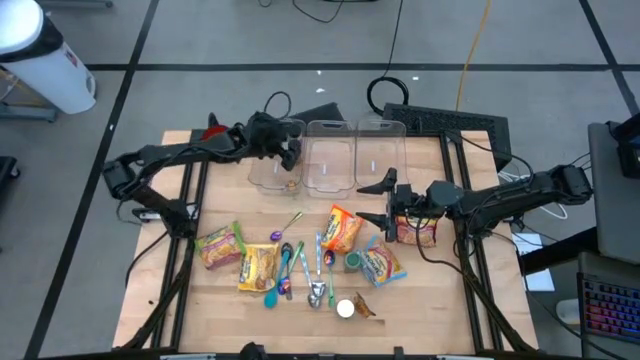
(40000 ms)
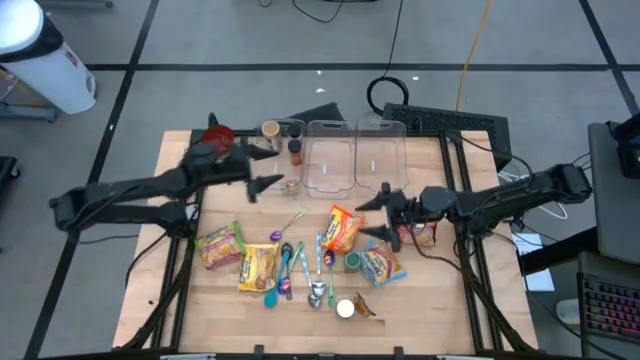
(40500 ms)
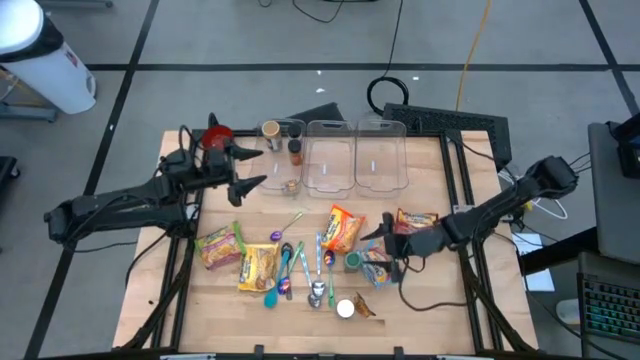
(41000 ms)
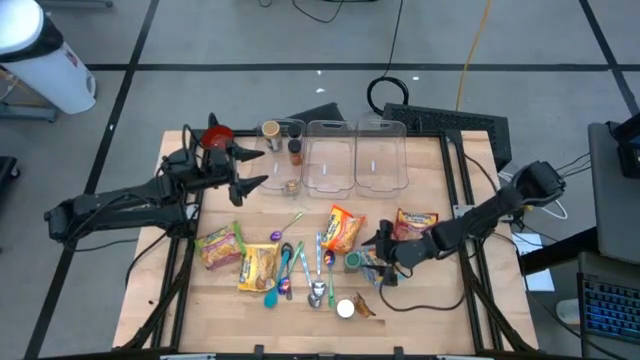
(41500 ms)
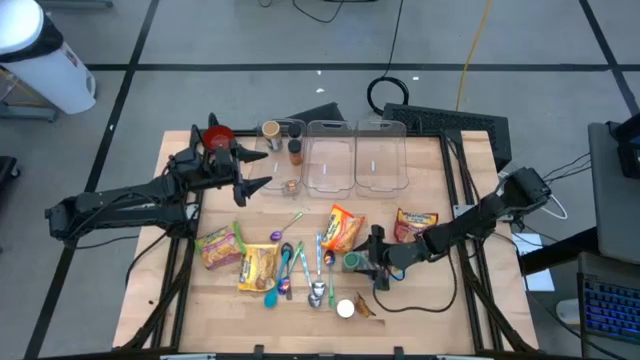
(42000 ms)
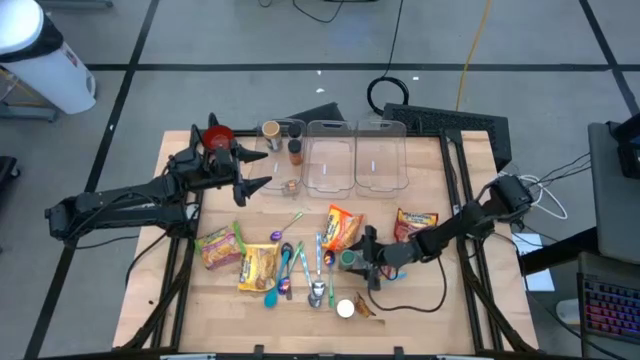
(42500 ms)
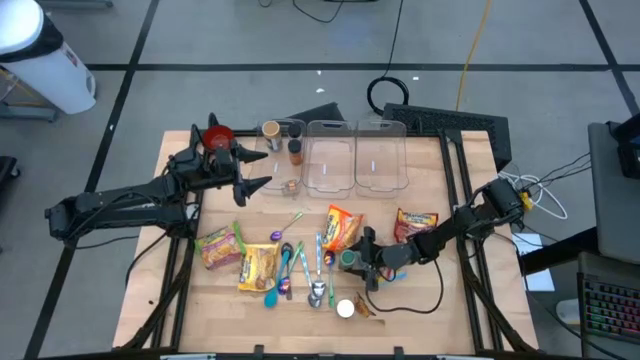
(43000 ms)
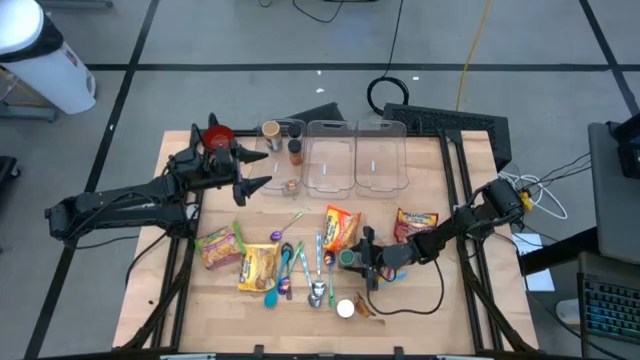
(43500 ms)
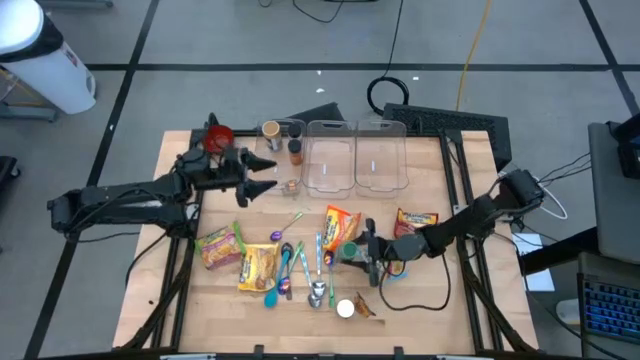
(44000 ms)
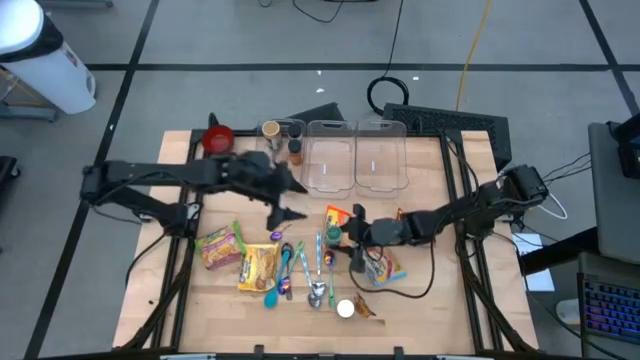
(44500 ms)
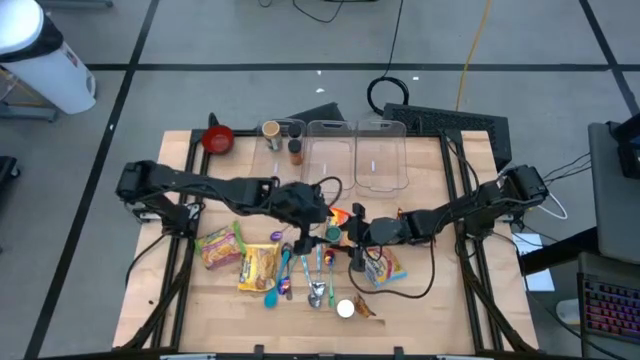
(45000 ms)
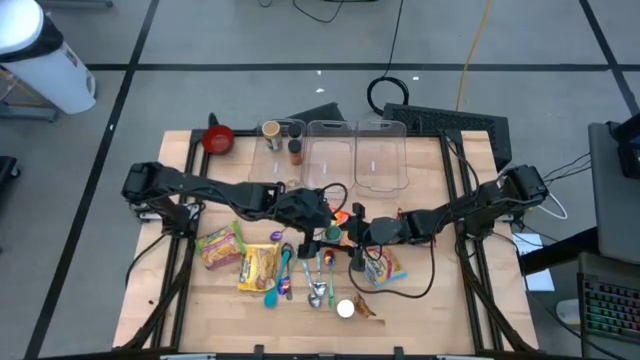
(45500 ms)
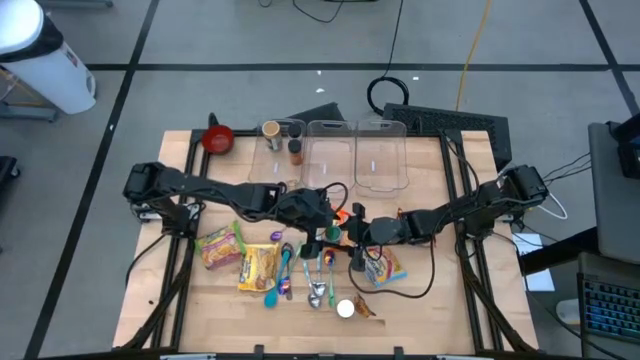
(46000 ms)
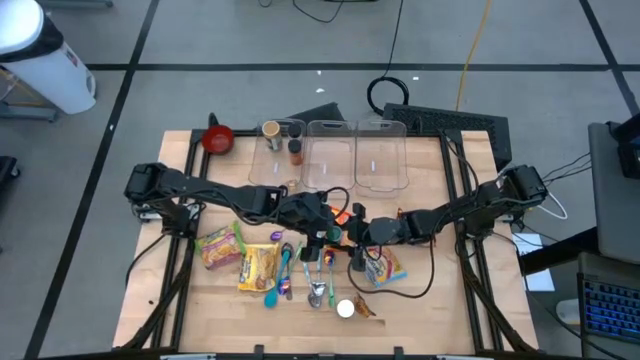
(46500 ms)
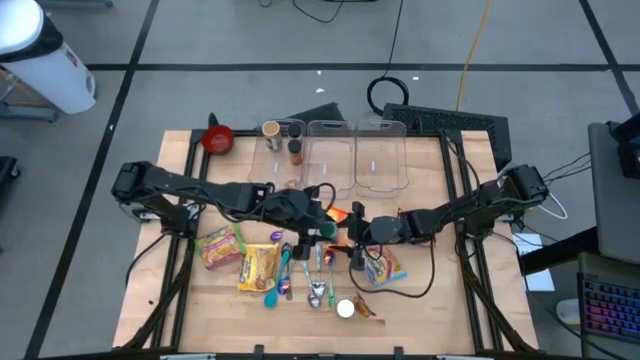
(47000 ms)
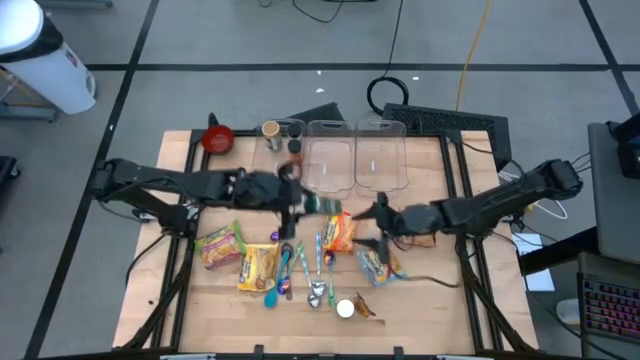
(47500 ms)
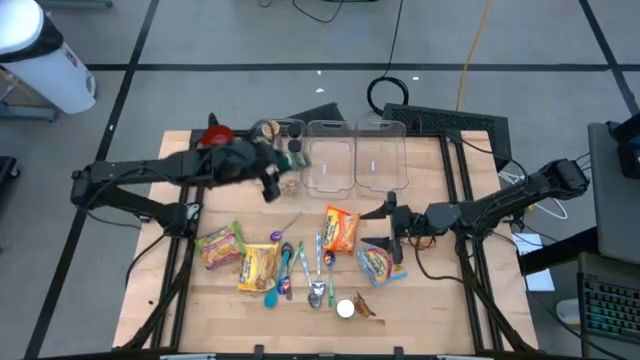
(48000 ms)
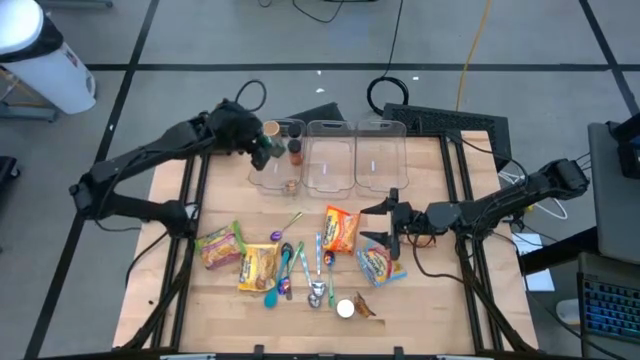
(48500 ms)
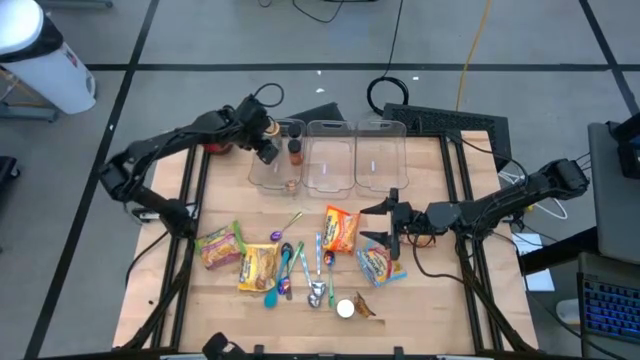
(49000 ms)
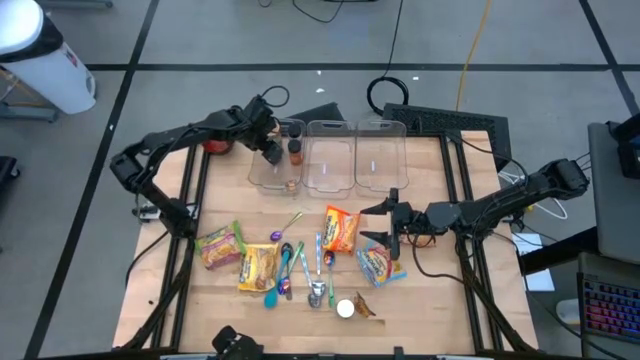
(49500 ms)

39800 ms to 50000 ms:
Task: Pick & Place Food Item
Put the green seasoning bottle into the left transparent bin

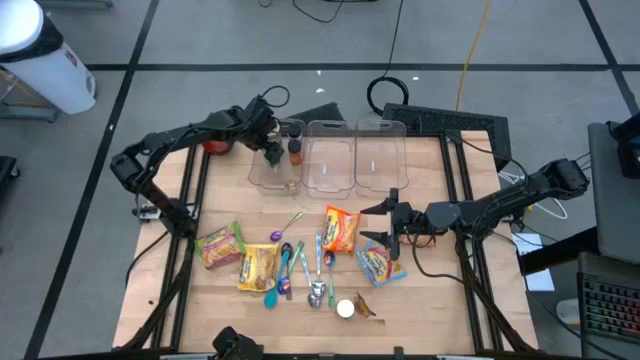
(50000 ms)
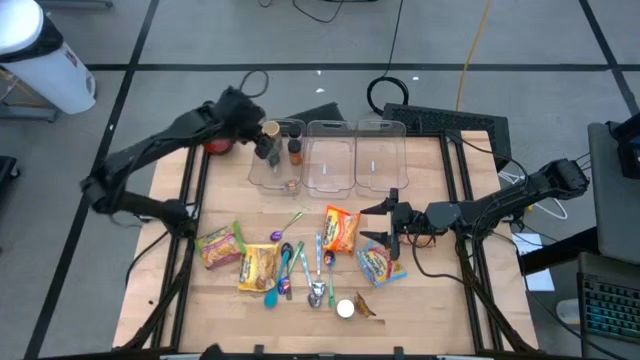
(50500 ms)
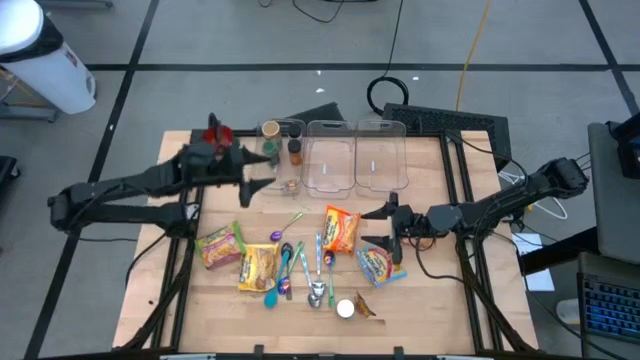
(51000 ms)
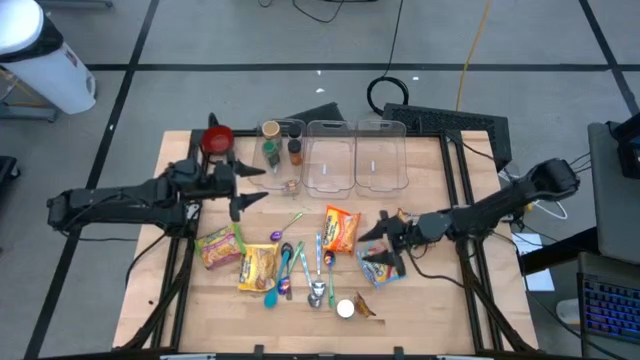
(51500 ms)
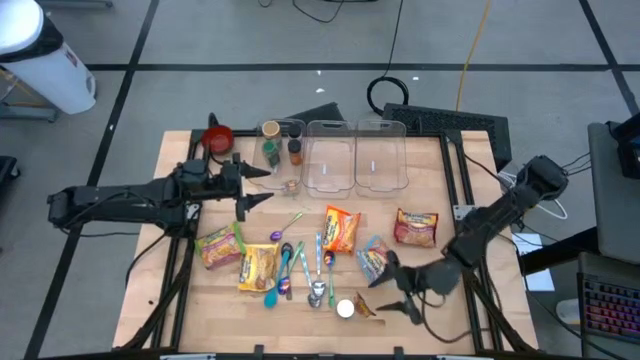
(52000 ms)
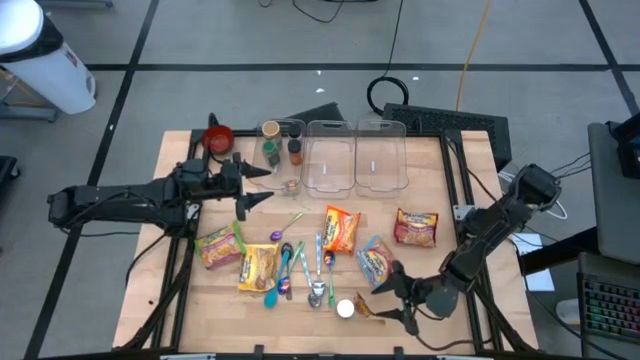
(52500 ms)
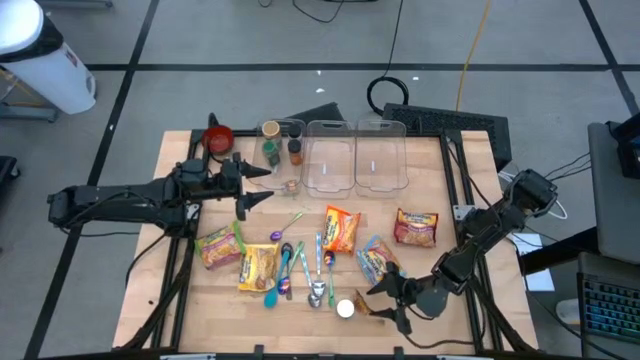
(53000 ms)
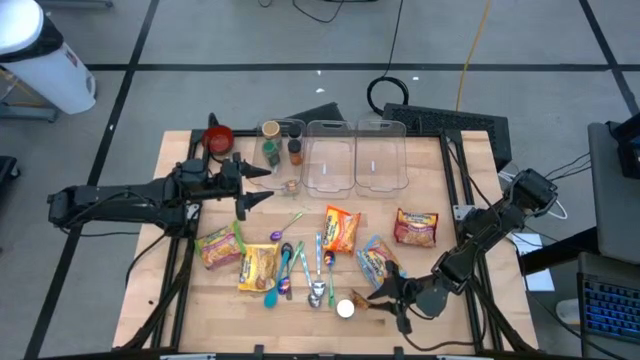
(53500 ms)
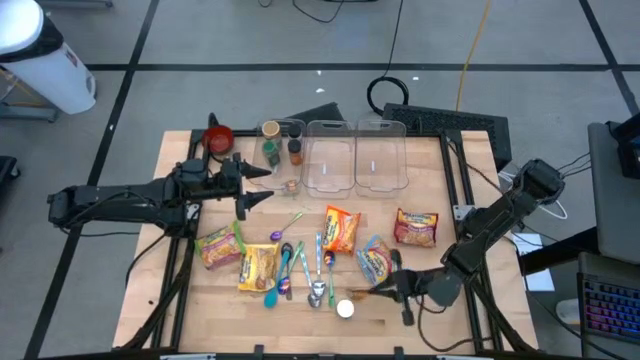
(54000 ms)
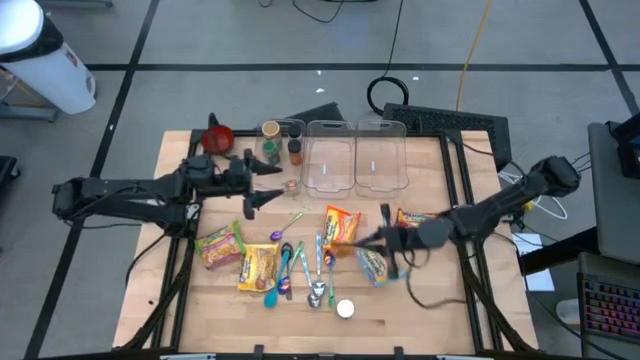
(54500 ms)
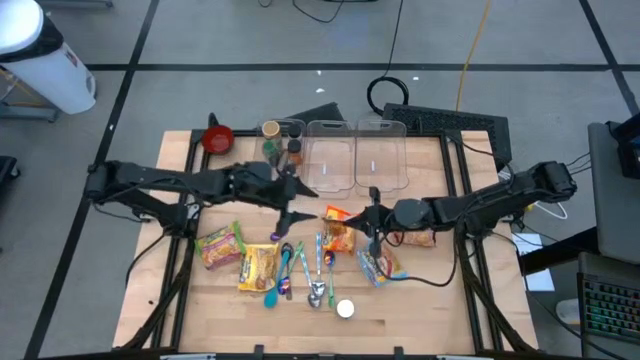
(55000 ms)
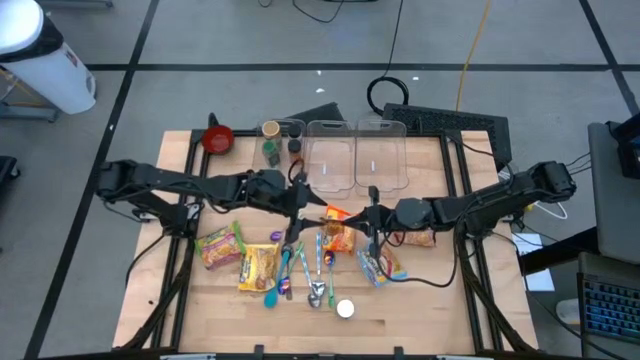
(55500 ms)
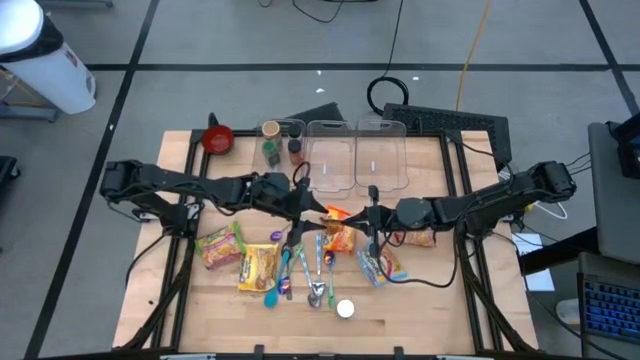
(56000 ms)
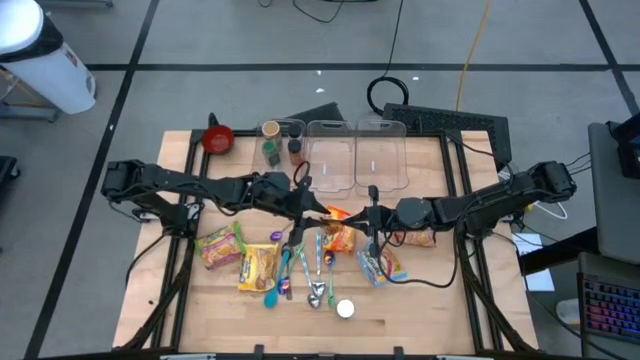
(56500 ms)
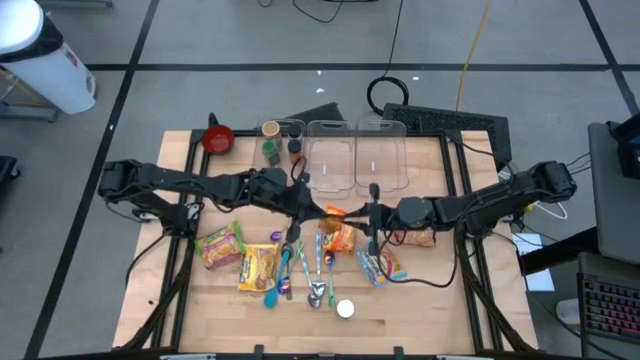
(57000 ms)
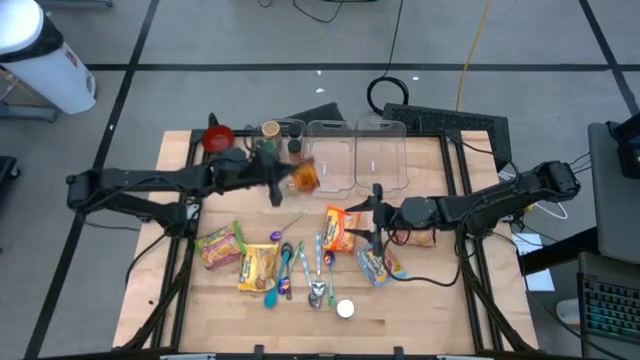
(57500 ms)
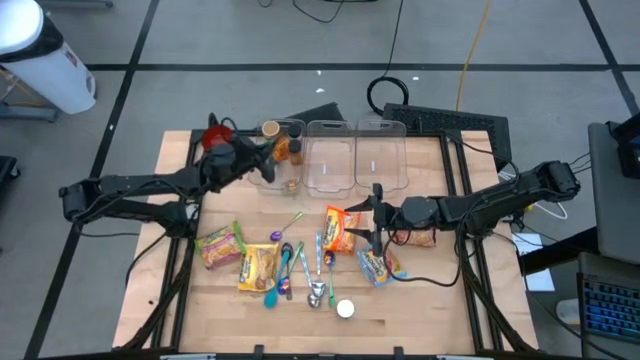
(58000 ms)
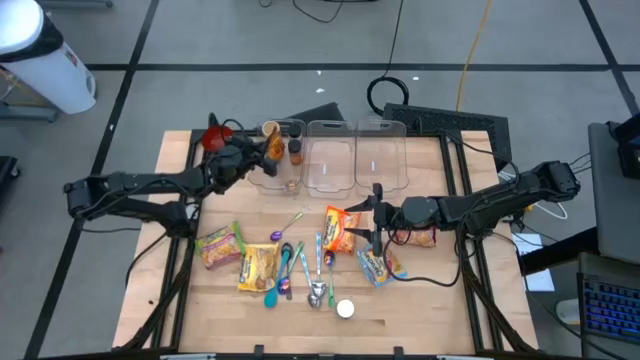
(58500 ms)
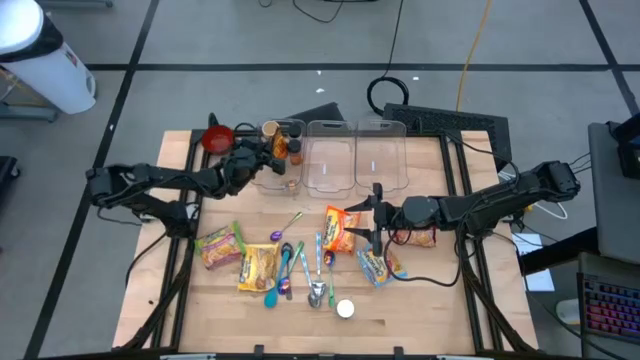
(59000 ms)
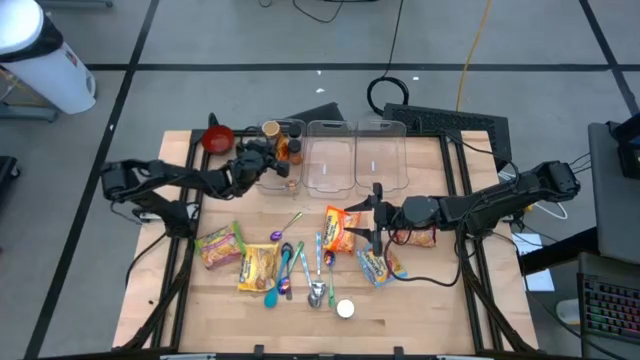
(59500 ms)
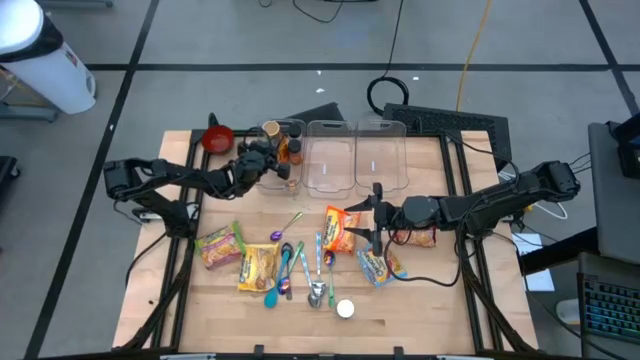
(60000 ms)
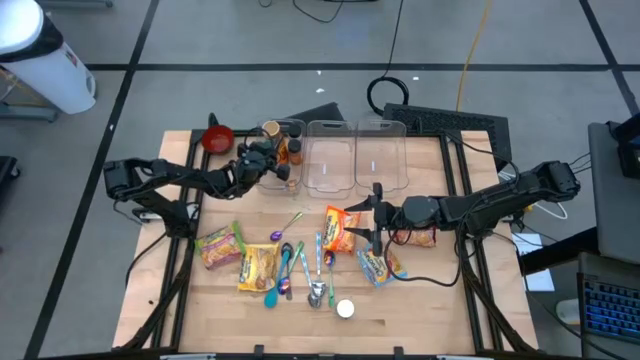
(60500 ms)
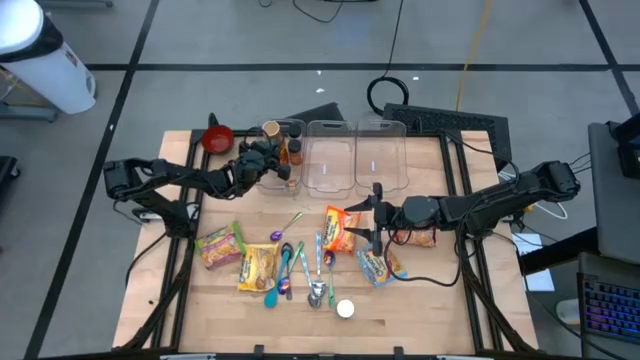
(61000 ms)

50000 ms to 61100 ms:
Put the orange seasoning pack into the left transparent bin
